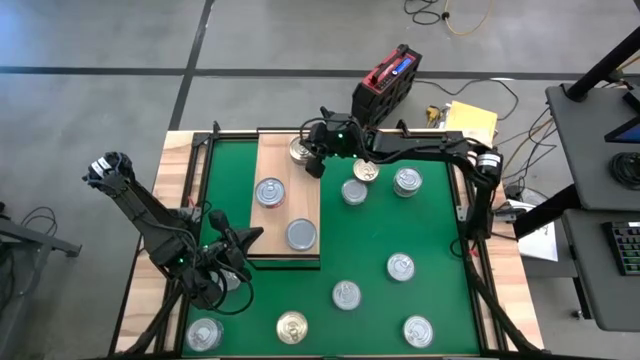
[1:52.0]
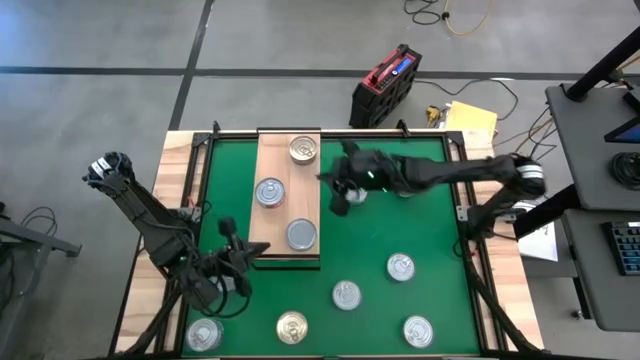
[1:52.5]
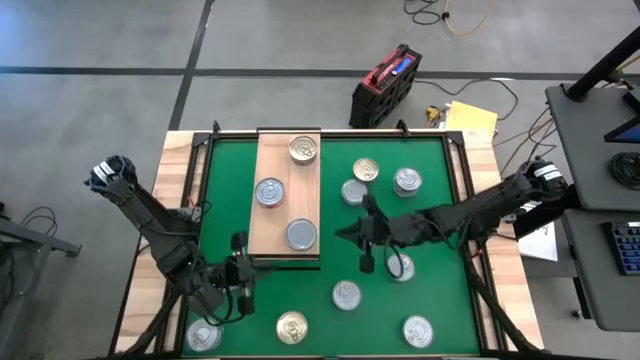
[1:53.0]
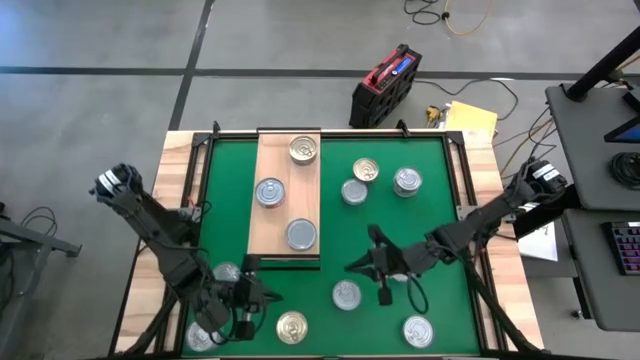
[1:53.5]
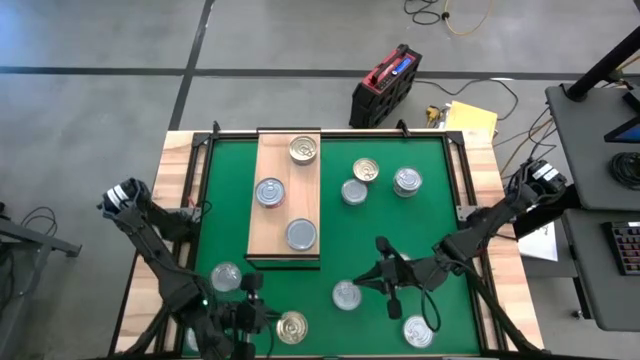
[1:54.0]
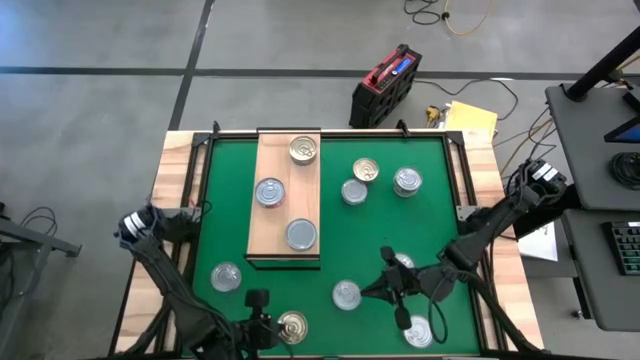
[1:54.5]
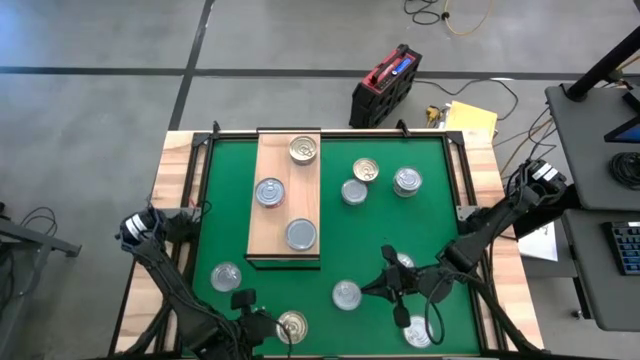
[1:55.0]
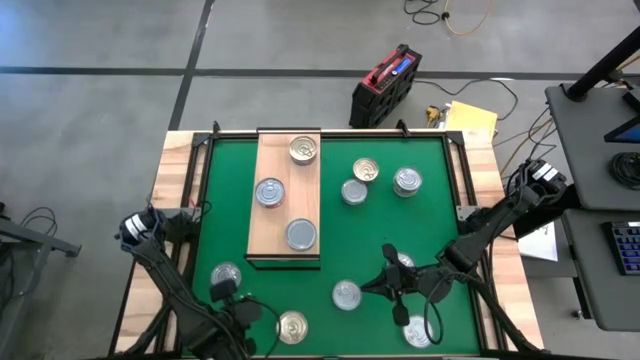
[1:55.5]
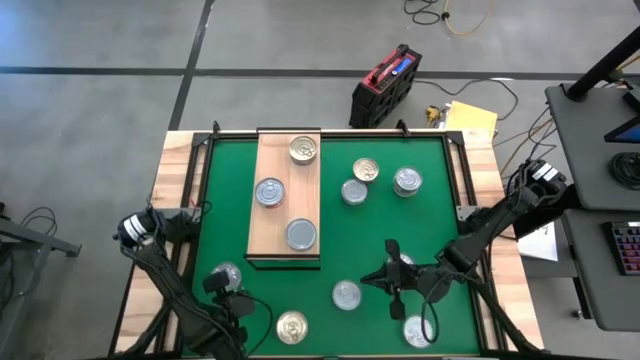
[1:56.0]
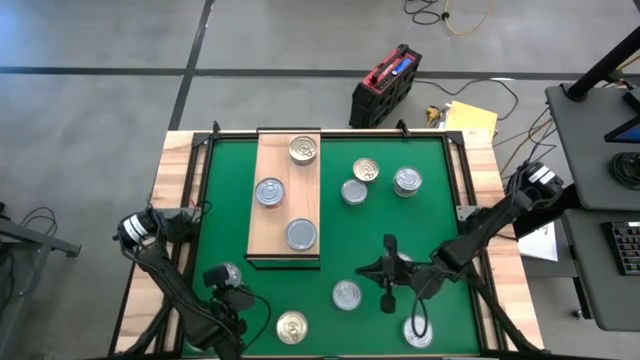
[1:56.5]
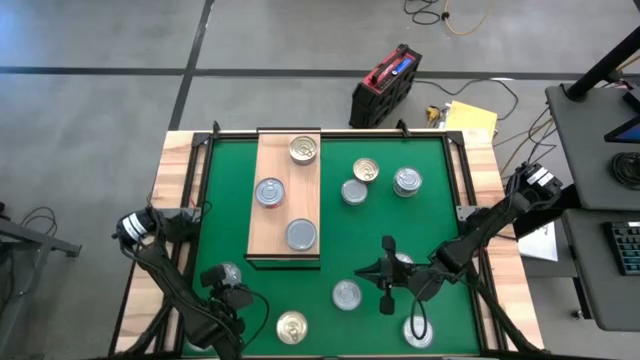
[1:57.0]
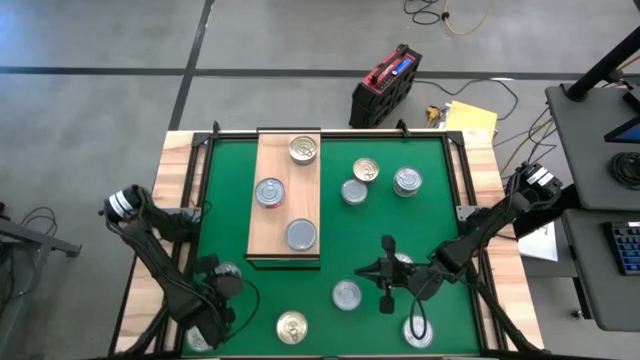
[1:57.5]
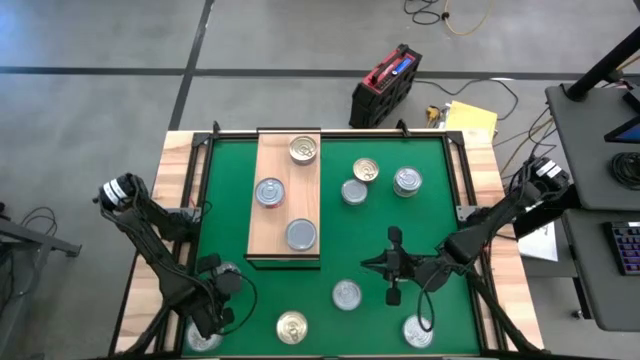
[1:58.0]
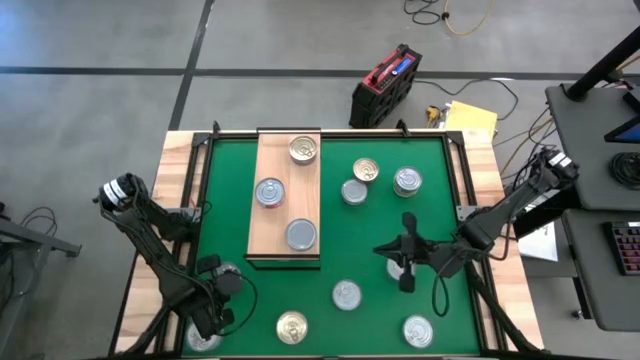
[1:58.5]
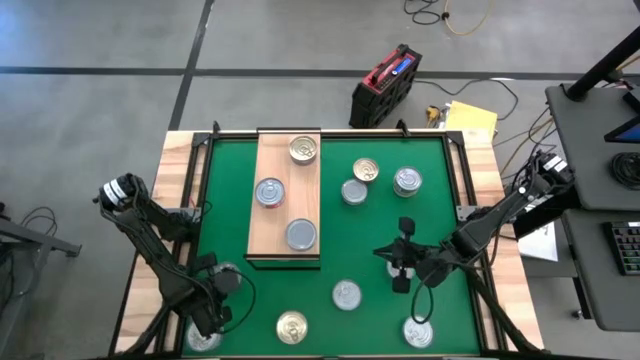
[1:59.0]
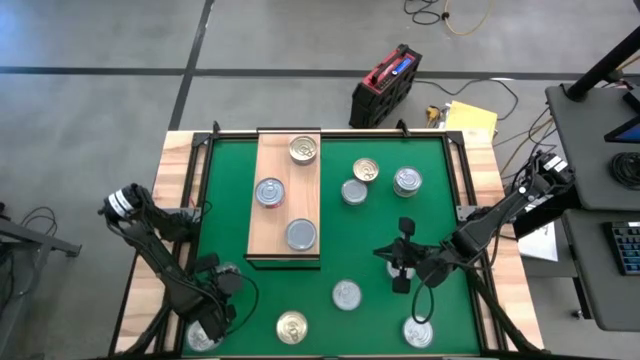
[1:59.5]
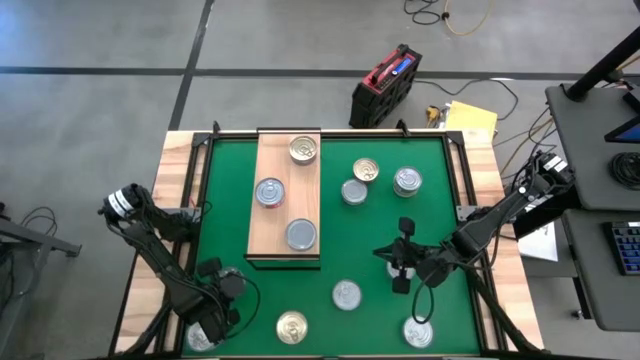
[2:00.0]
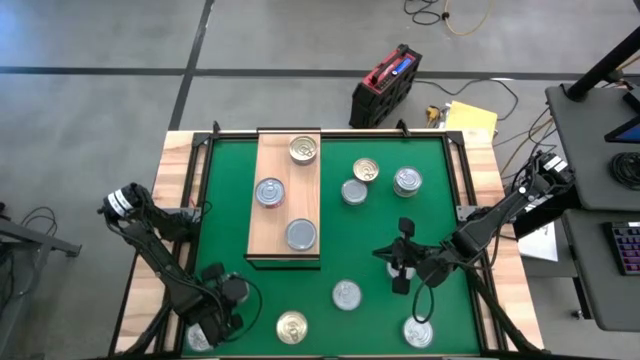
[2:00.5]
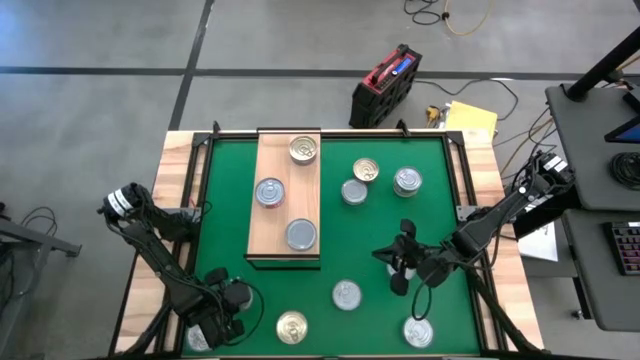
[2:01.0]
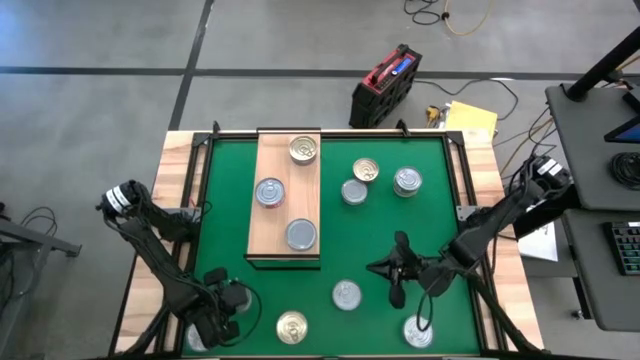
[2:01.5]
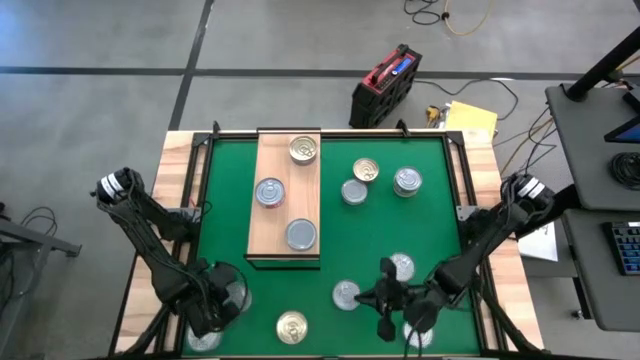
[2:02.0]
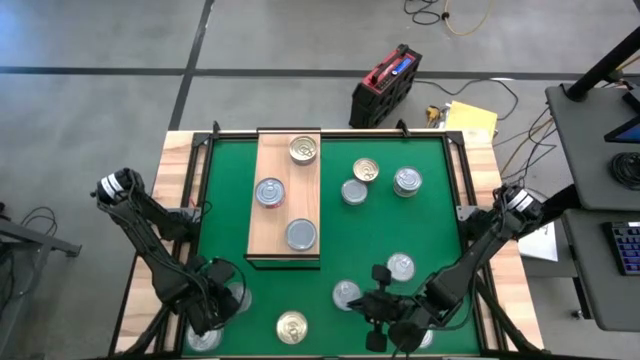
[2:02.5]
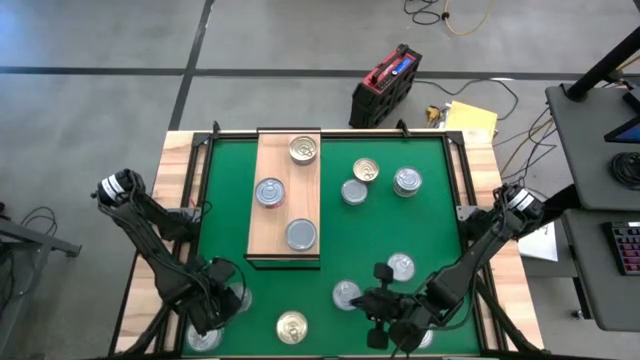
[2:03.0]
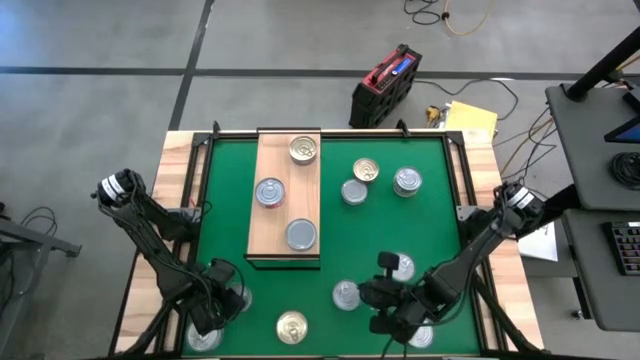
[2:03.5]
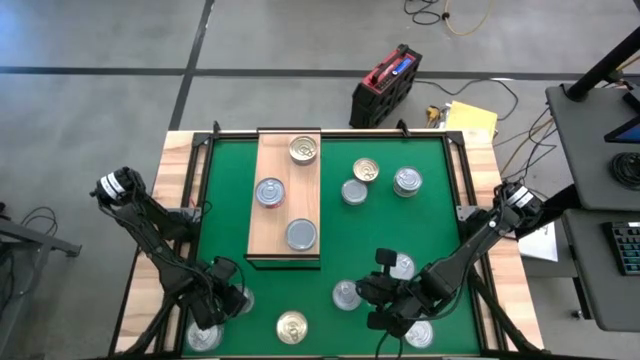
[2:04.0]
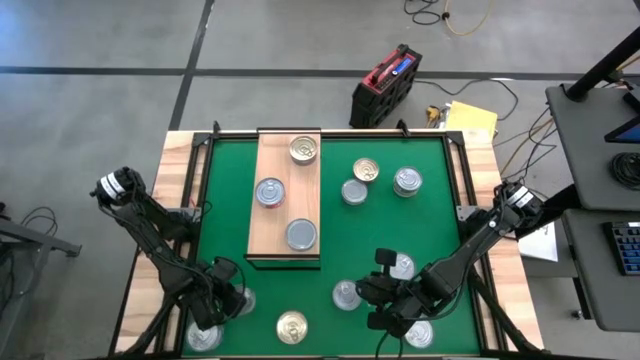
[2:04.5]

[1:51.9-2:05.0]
Task: Stack canned seafood by type on shelf
Stack the red tuna can on top of the red tuna can on the shelf

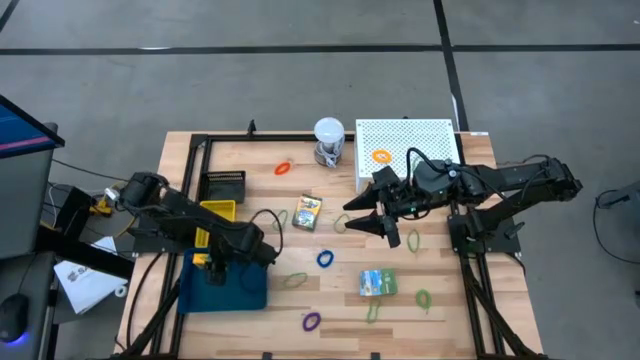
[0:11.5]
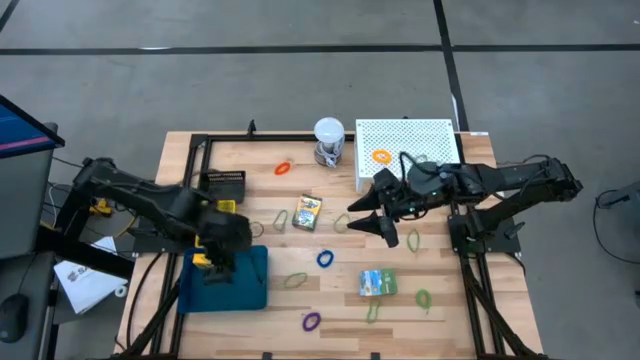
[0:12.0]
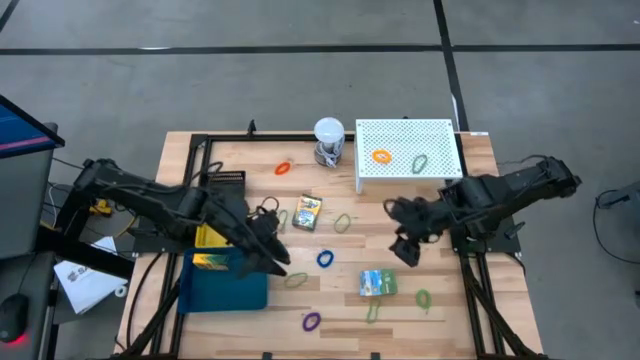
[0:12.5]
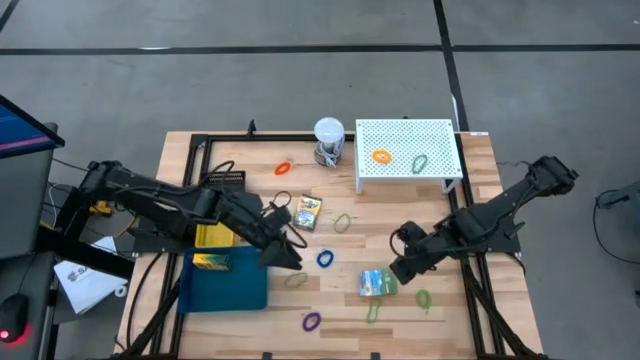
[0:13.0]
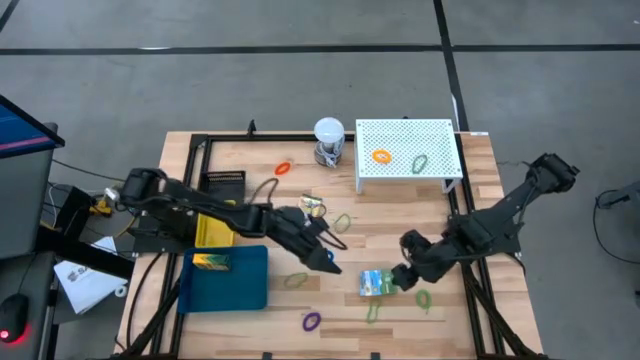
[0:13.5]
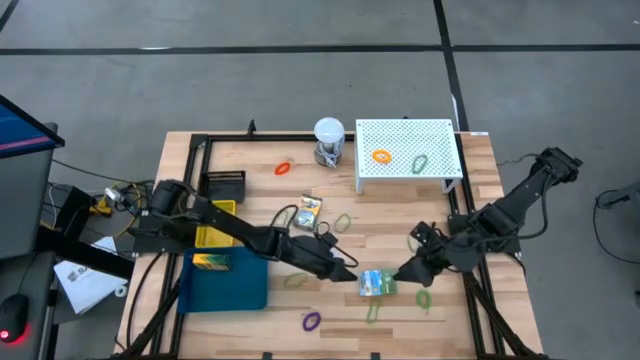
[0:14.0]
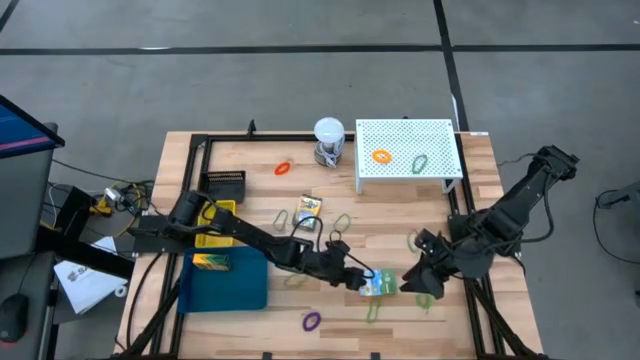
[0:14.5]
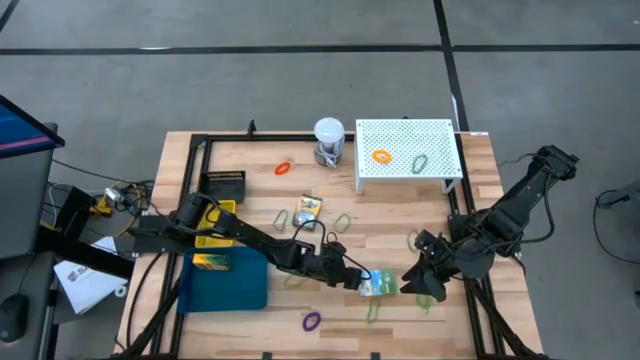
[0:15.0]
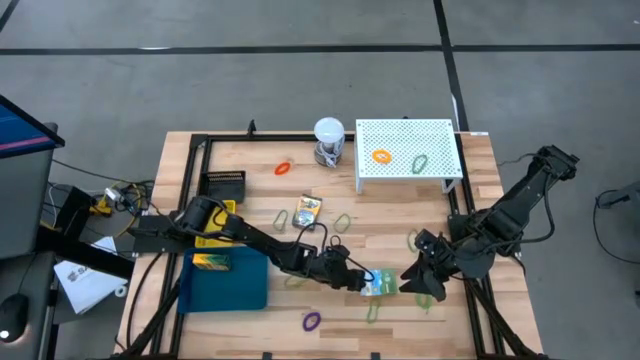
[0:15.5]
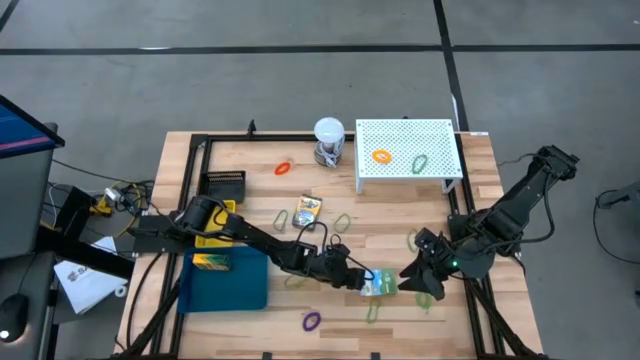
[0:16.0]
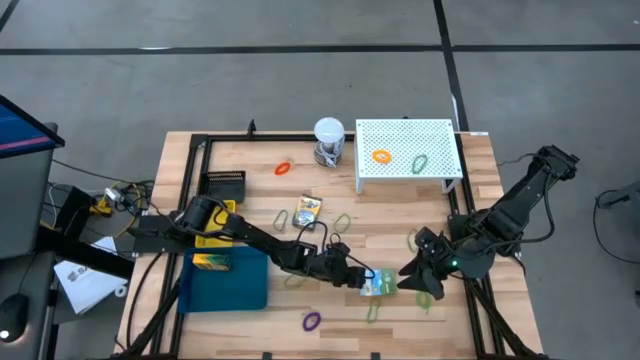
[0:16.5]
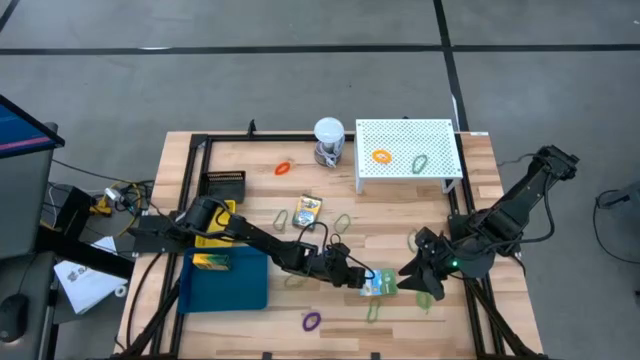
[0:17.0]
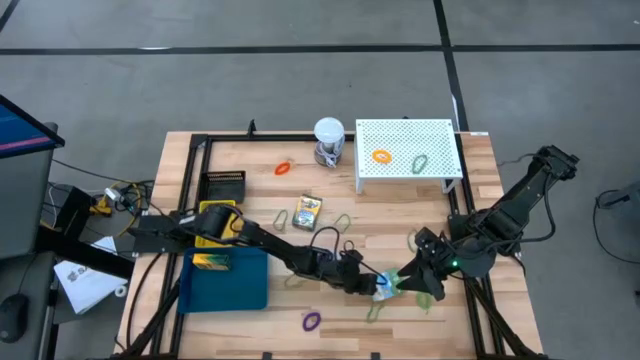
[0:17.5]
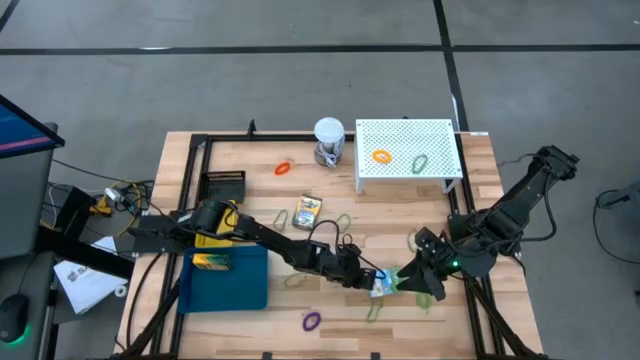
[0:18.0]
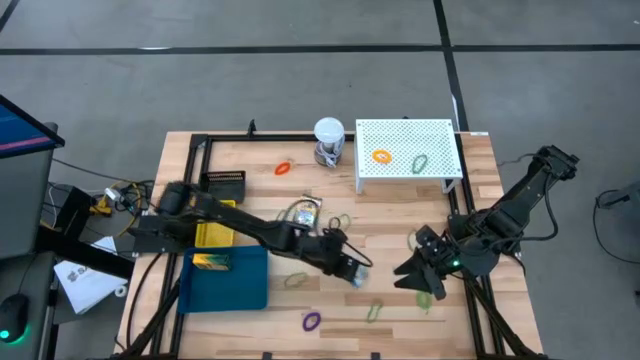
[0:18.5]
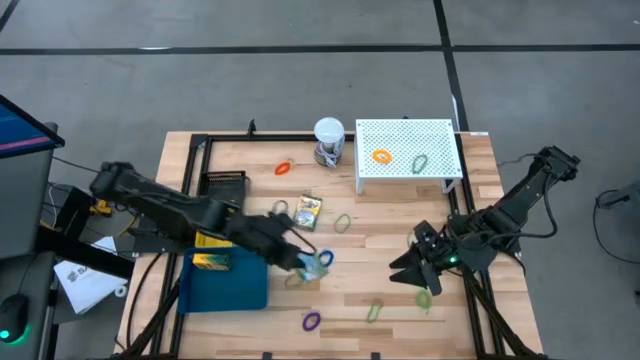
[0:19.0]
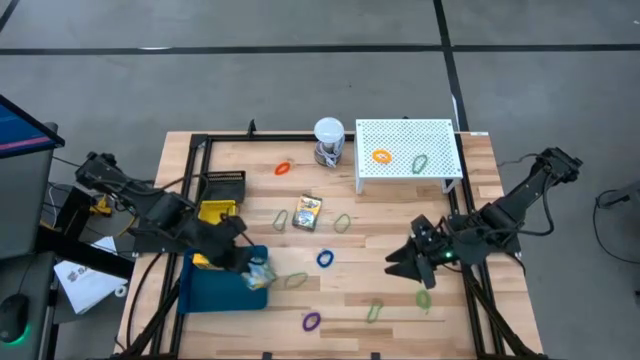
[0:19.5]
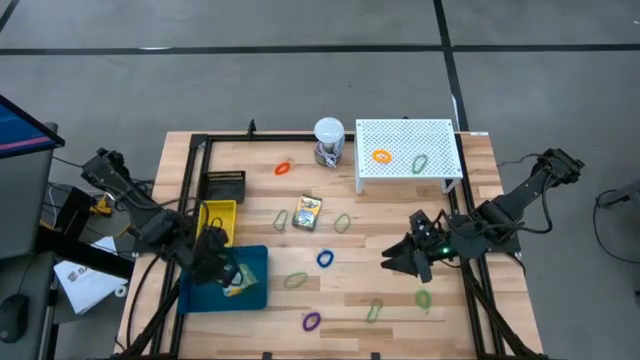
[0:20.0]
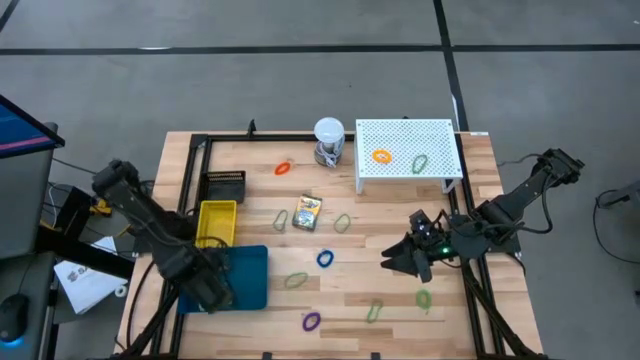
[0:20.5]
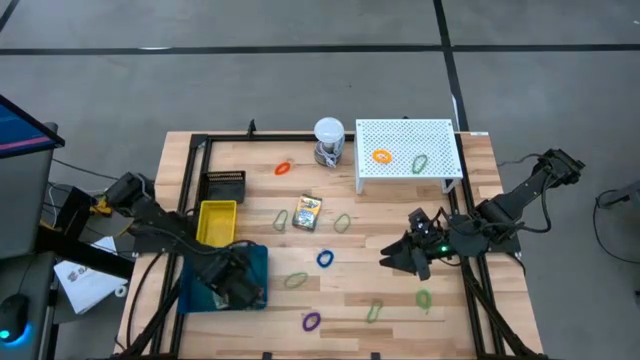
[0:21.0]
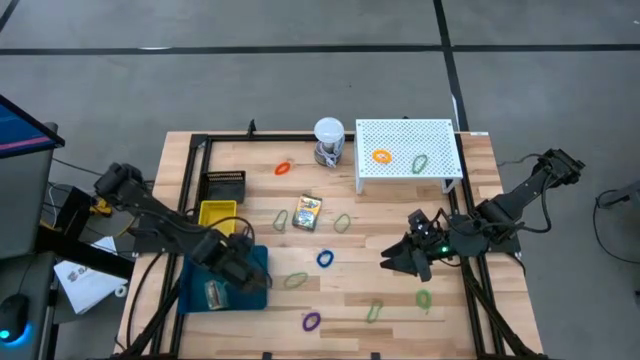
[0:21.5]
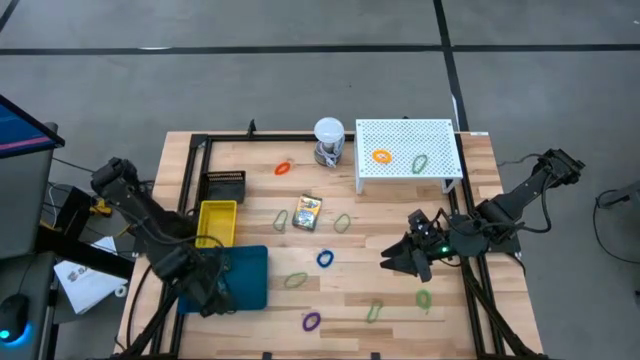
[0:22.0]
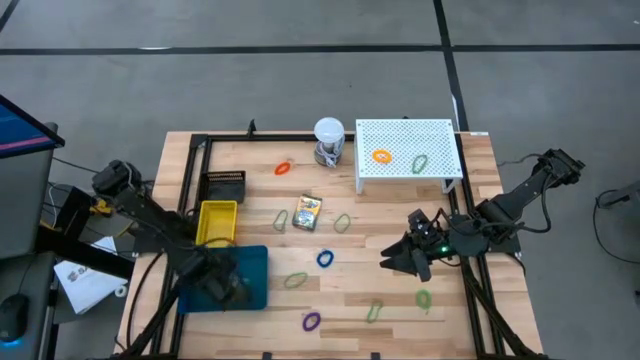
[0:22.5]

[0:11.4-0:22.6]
Task: Pick & Place Office Desk Supplies
Put the bottom crayon box into the blue bin
